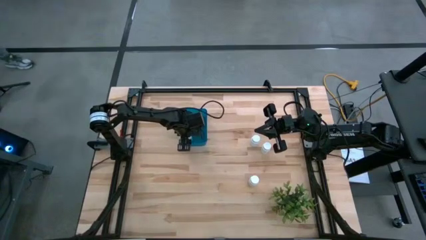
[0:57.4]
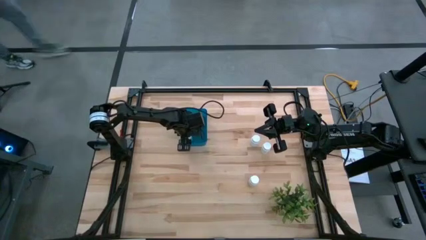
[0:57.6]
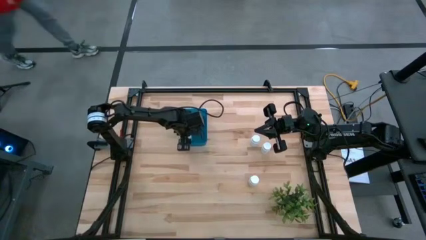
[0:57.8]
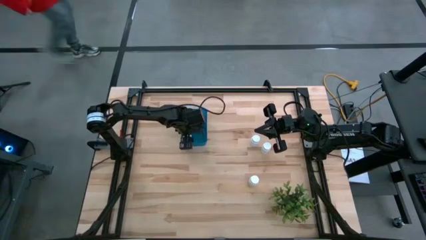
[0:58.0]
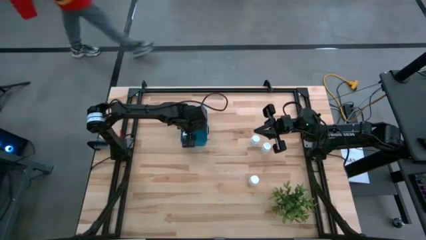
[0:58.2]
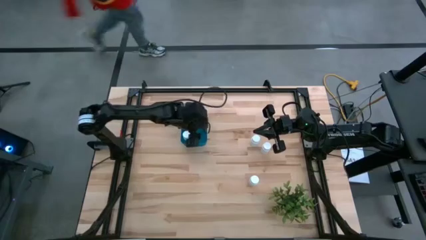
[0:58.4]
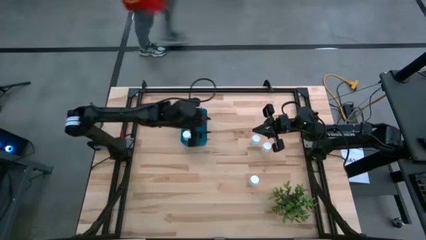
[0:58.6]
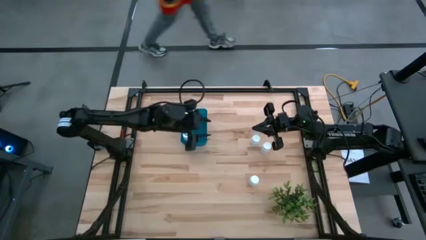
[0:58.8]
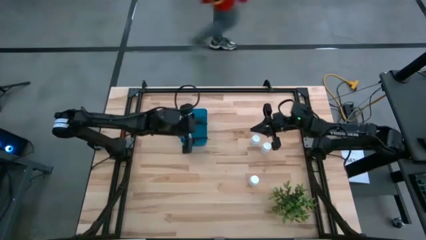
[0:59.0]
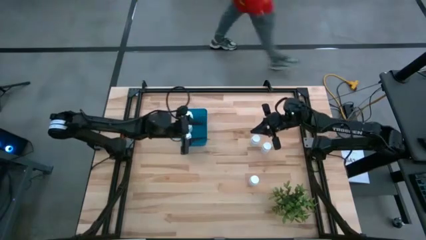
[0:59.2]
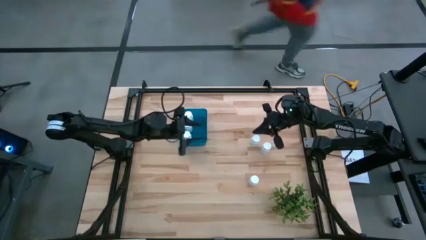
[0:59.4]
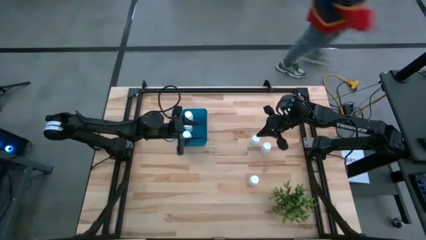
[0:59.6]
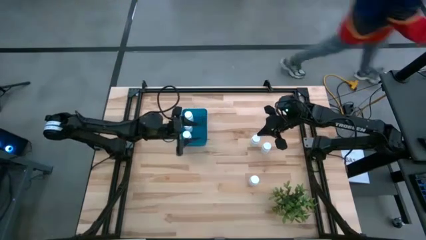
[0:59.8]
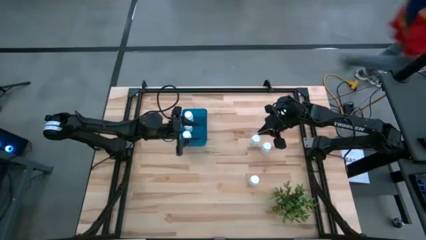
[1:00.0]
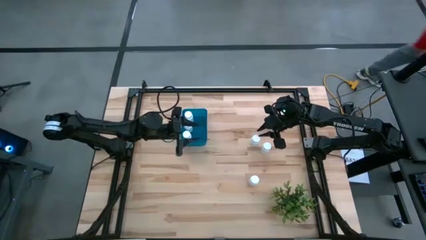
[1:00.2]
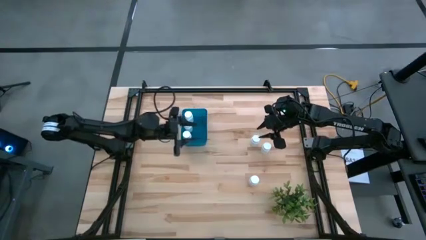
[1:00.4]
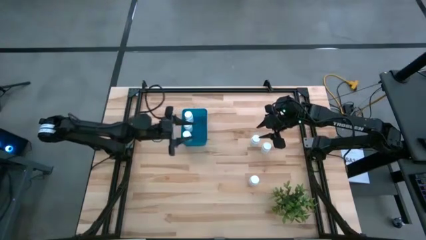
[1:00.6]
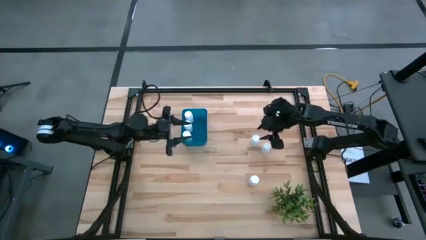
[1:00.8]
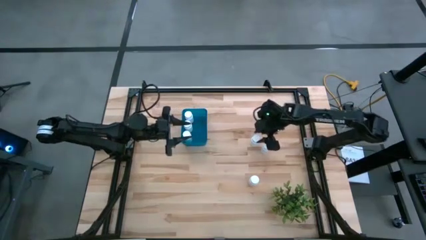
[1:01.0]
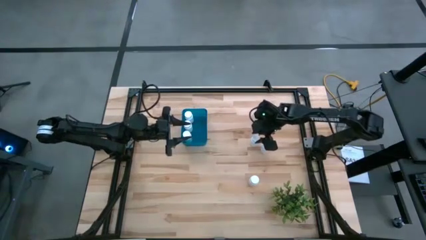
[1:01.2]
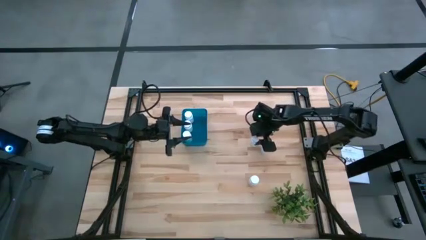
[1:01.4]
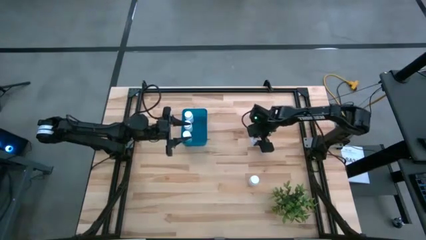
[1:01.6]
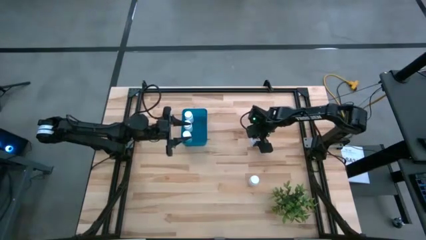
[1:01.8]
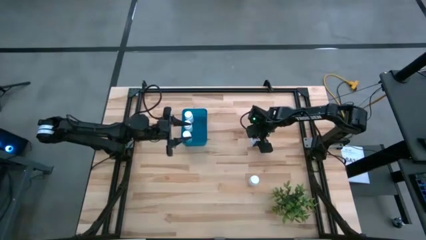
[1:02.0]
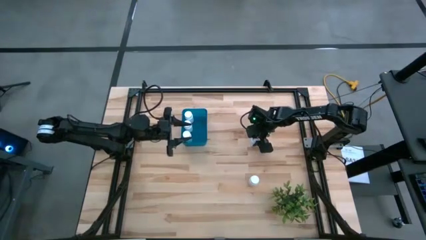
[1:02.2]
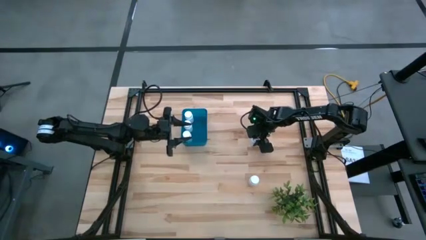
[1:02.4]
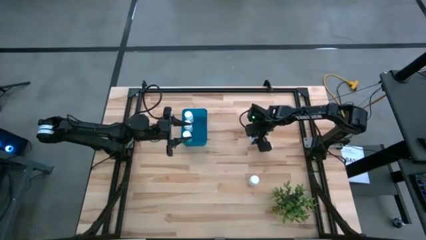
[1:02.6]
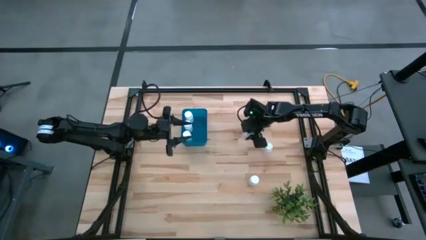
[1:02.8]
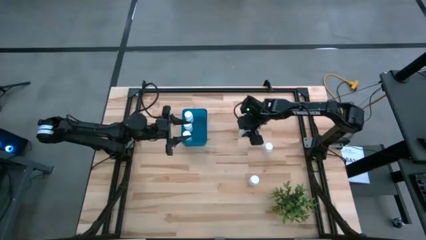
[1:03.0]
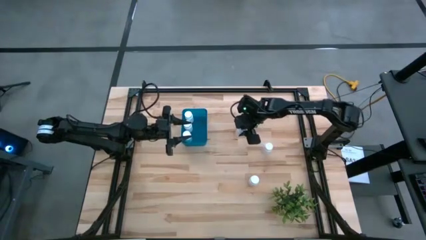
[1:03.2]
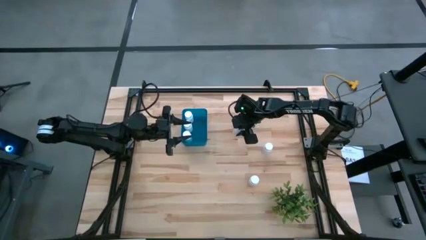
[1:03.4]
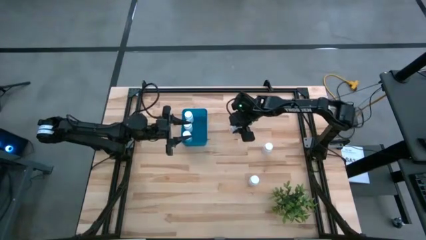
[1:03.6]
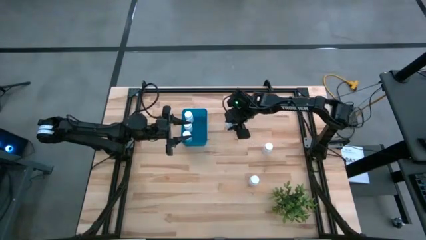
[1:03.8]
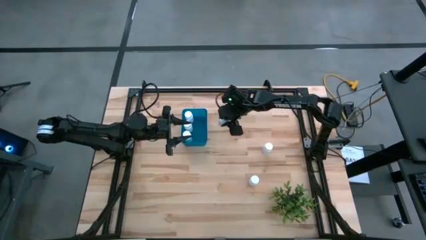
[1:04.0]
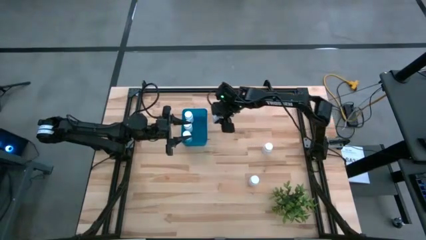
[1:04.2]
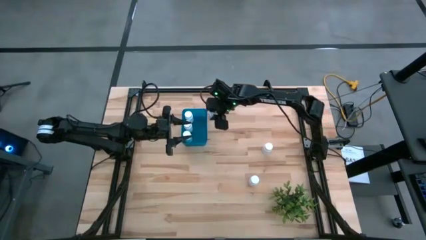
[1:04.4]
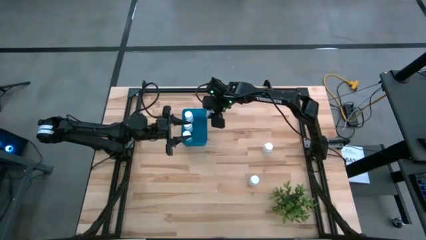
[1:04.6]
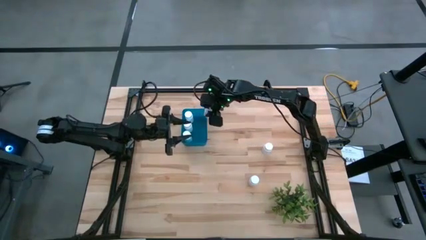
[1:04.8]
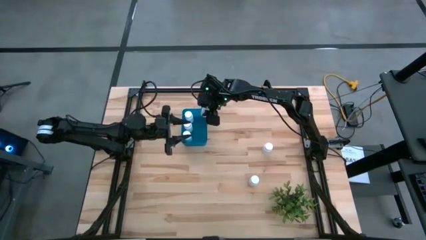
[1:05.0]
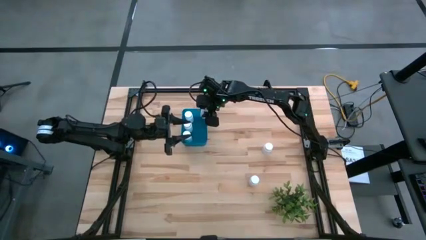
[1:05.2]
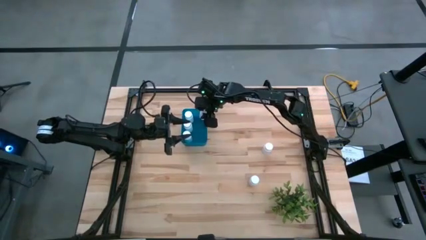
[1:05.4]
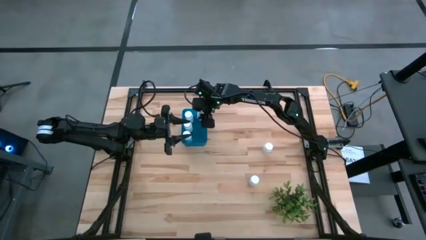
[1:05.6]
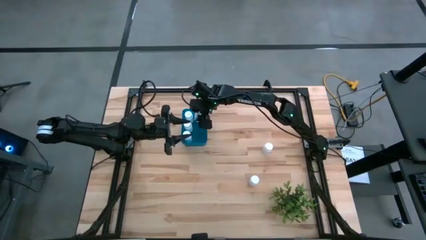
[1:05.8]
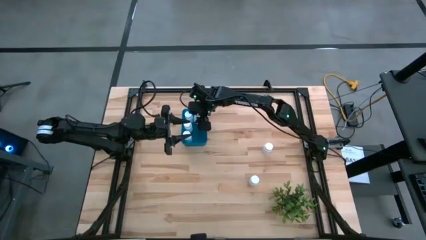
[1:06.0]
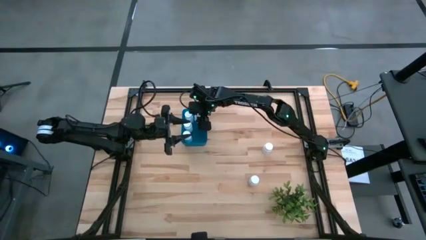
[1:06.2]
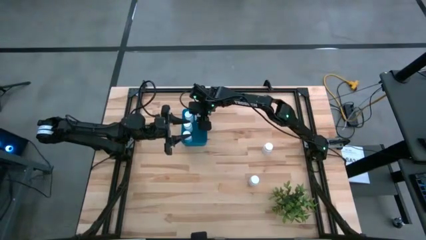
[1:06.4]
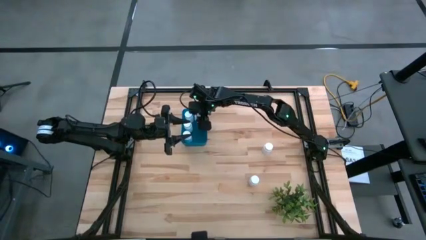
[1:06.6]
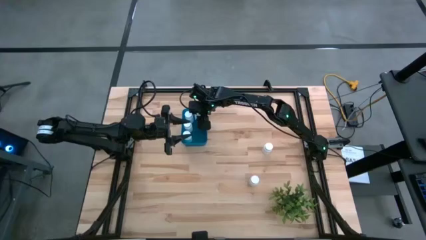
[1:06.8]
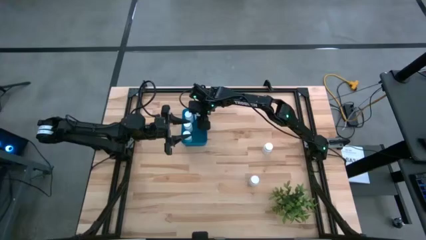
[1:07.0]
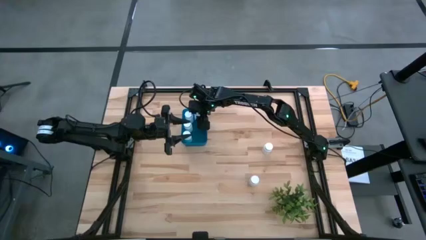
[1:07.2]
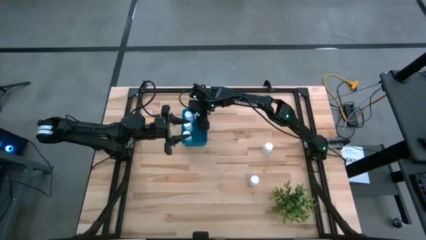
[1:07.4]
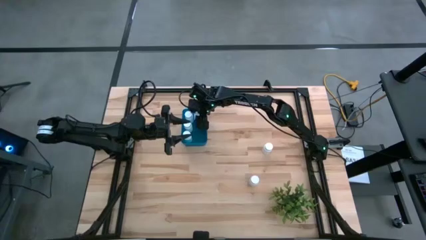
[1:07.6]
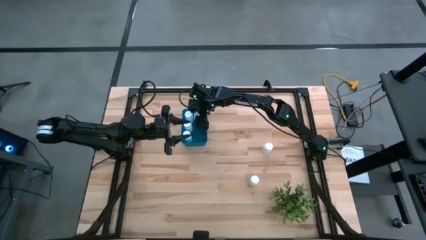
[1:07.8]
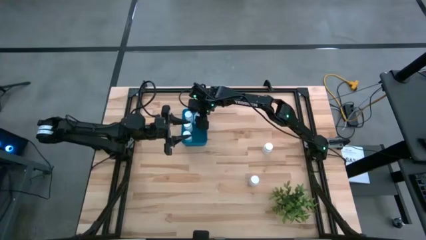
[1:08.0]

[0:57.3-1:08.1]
Task: Pick and place pill bottles into a basket
Put the white medicine bottle into the blue bin

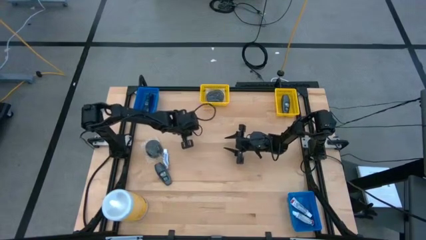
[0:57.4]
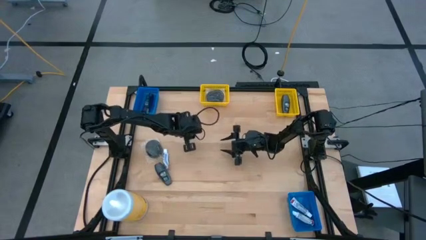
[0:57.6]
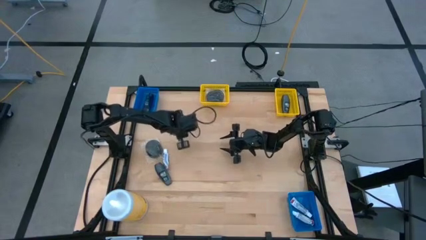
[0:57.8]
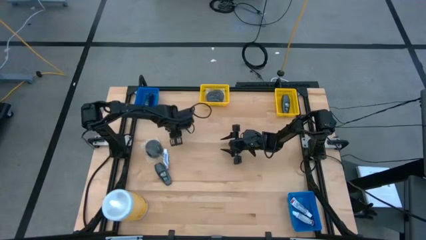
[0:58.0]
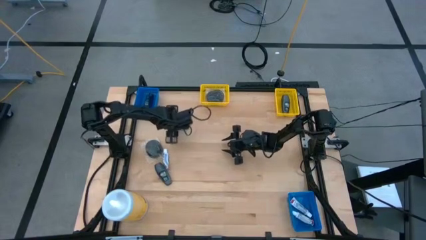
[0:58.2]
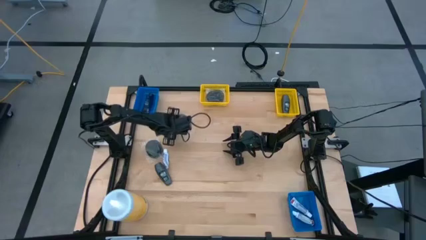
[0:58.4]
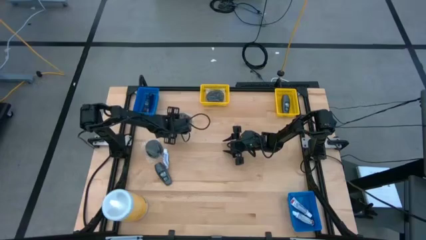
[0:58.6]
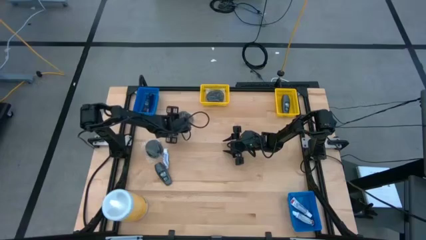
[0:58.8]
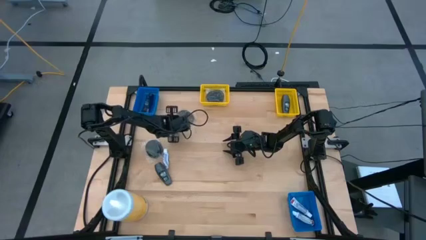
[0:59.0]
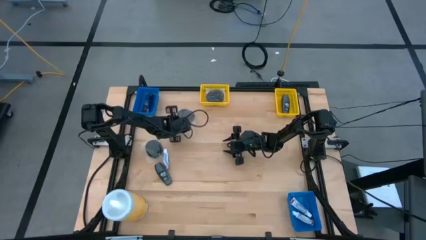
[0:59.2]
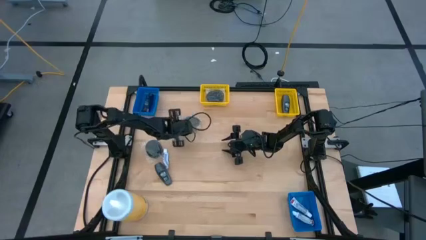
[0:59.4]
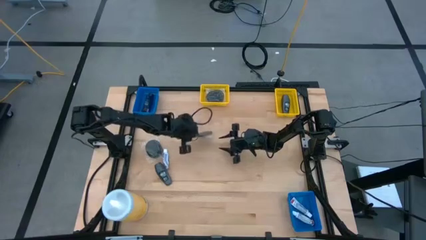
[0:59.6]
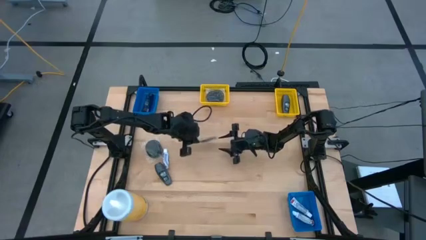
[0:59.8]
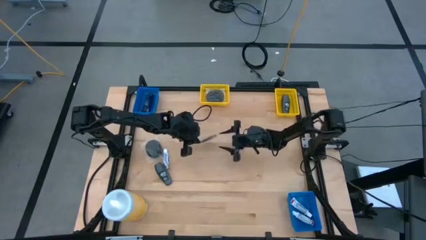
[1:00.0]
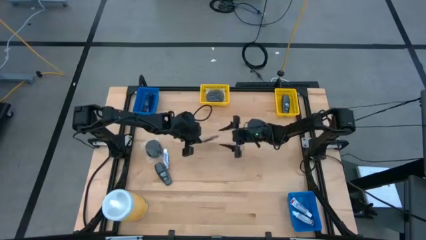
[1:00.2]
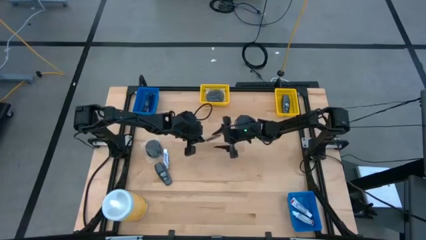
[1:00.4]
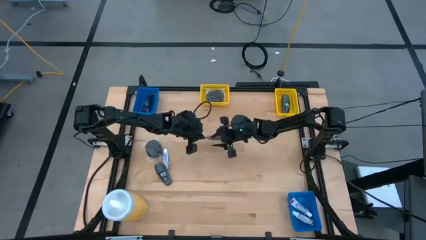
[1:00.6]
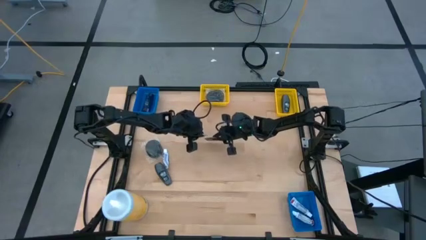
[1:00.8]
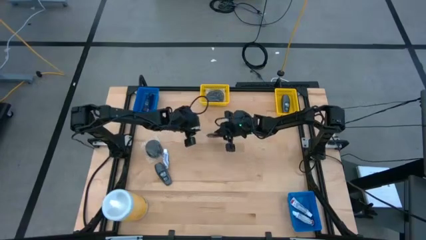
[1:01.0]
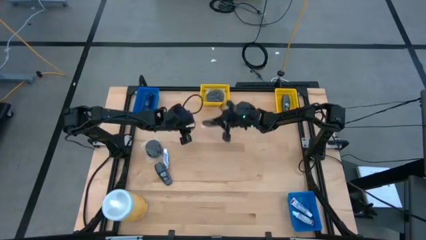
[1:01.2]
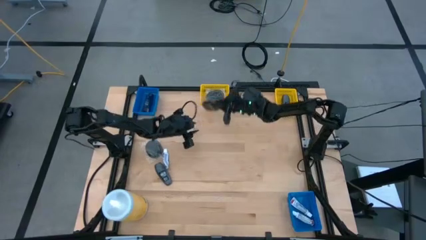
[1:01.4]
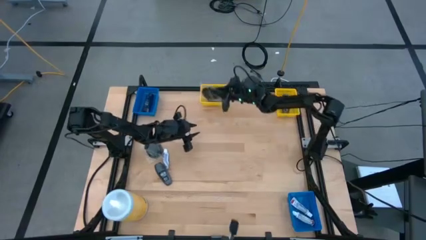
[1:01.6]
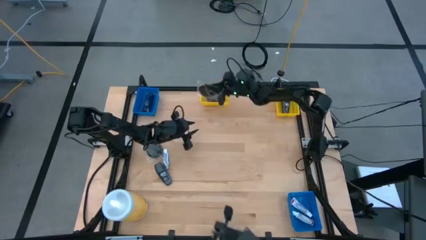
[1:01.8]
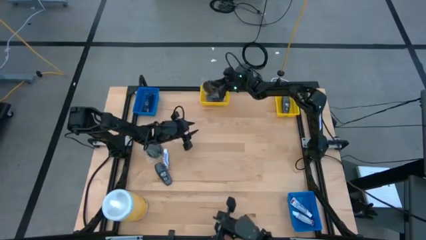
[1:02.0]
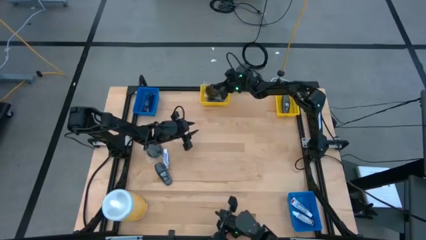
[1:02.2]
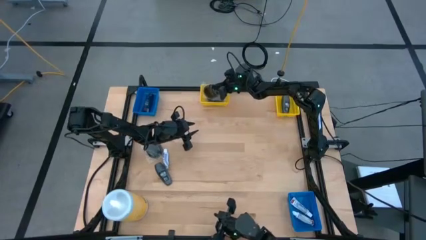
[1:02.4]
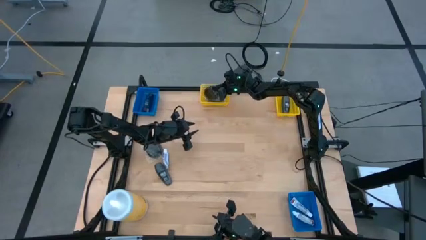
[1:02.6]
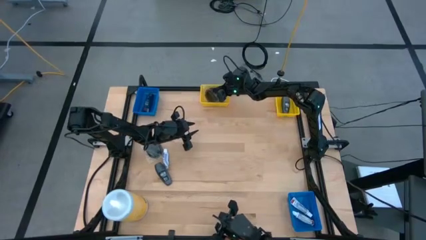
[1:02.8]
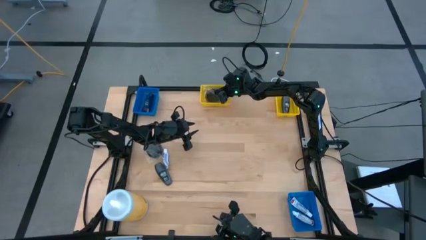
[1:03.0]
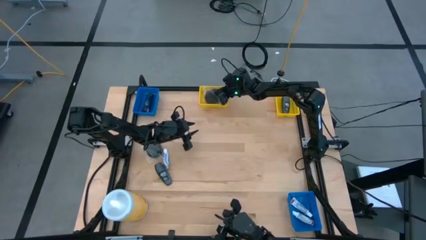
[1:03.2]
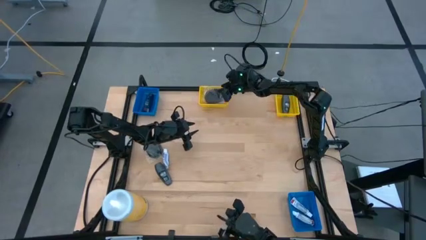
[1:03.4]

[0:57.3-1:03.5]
Task: Pick & Place Travel size toiletries
Put the hairbrush into the left yellow bin
